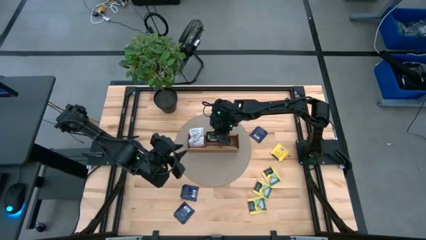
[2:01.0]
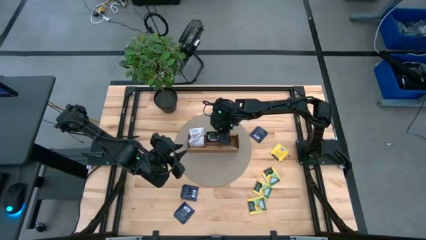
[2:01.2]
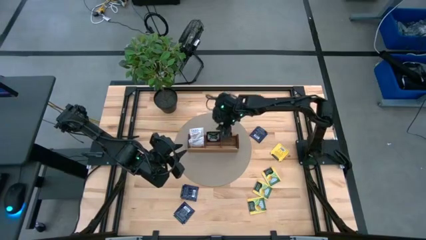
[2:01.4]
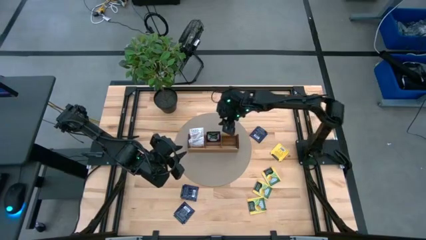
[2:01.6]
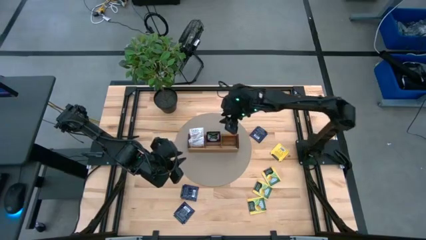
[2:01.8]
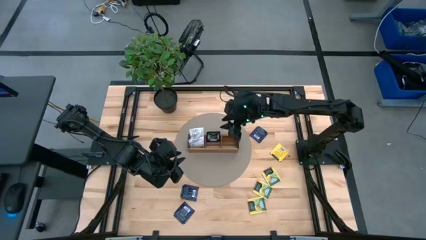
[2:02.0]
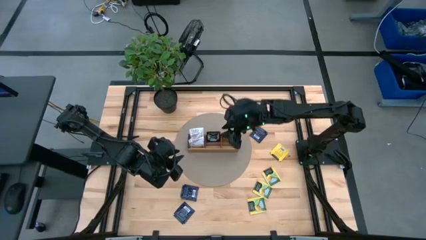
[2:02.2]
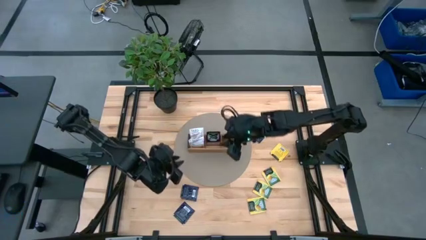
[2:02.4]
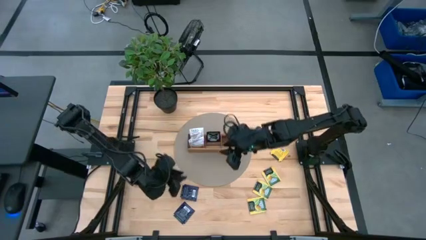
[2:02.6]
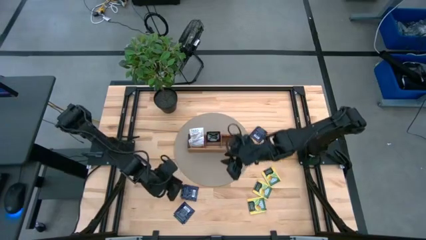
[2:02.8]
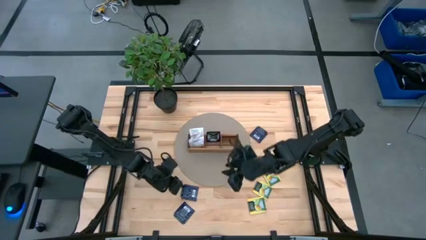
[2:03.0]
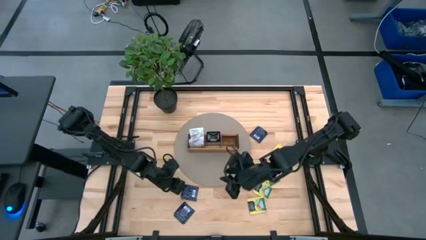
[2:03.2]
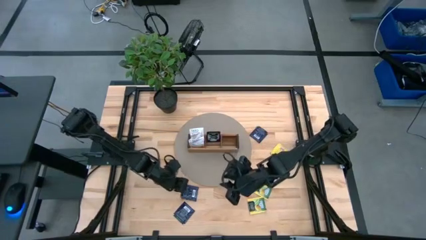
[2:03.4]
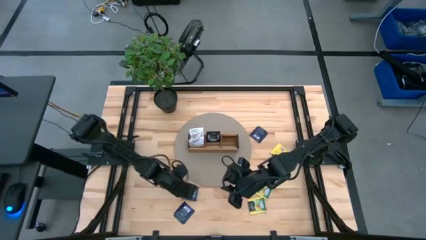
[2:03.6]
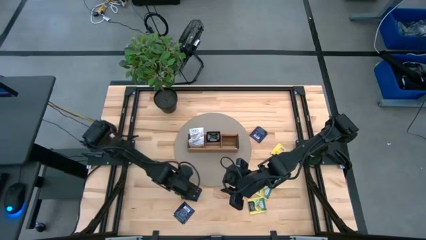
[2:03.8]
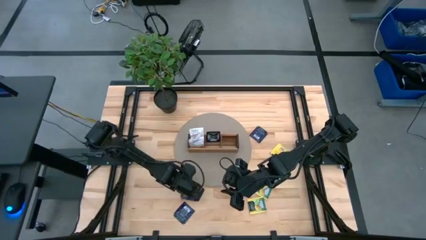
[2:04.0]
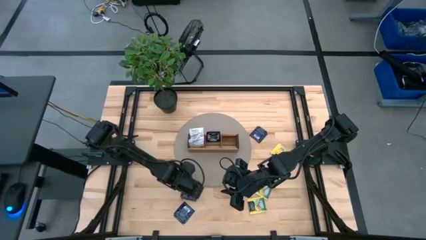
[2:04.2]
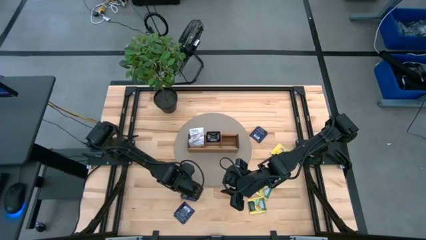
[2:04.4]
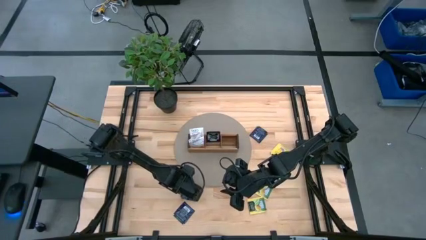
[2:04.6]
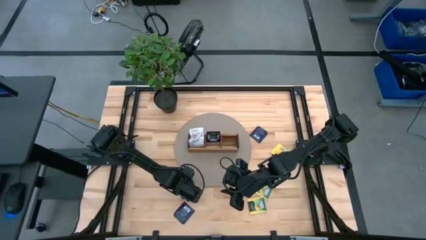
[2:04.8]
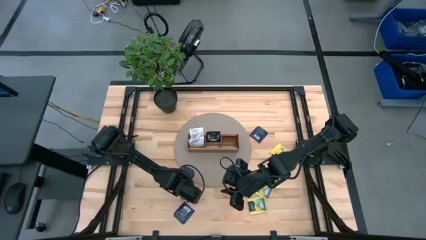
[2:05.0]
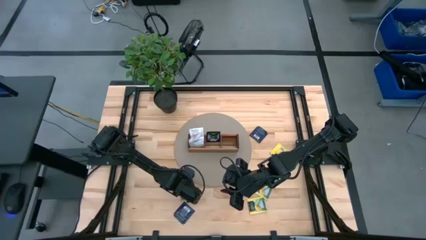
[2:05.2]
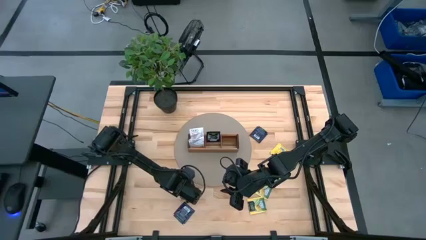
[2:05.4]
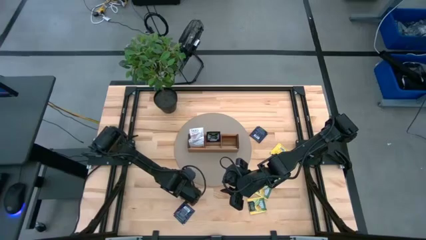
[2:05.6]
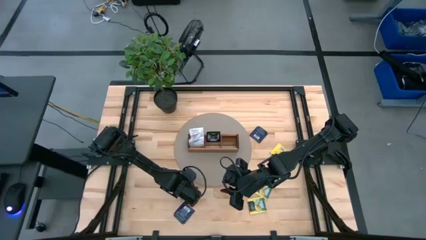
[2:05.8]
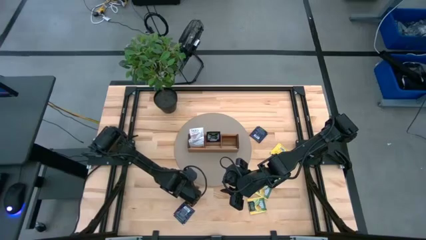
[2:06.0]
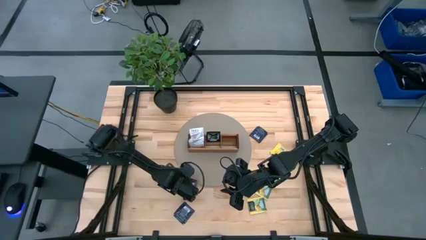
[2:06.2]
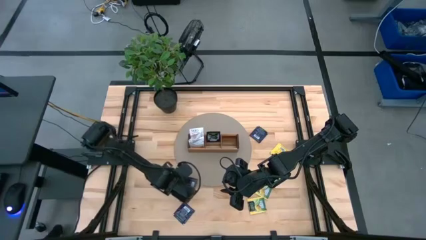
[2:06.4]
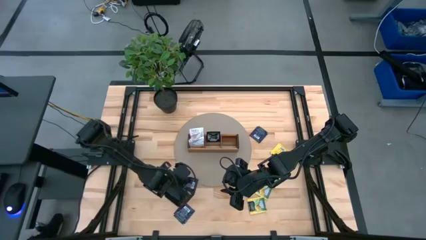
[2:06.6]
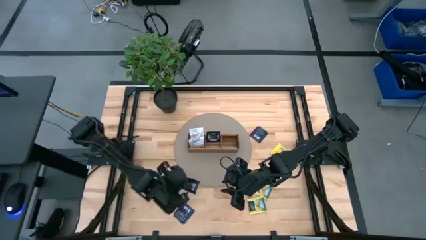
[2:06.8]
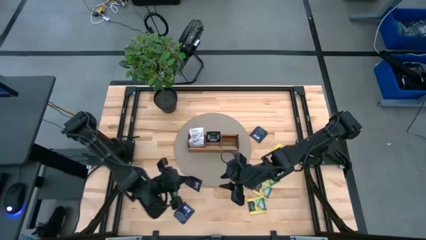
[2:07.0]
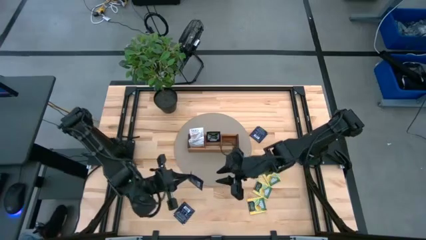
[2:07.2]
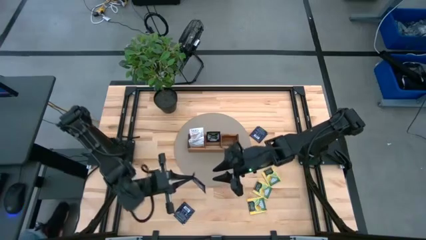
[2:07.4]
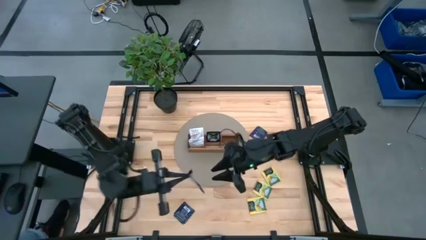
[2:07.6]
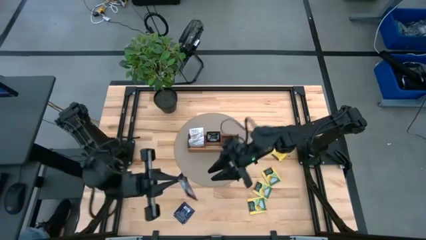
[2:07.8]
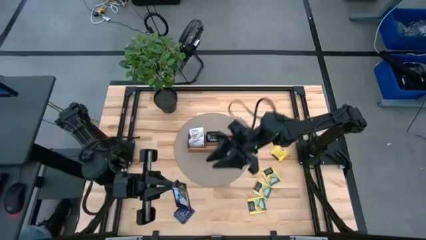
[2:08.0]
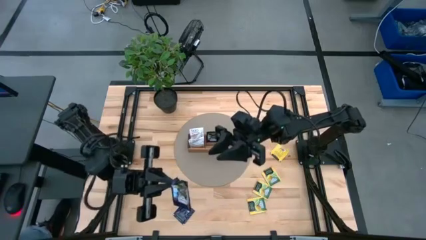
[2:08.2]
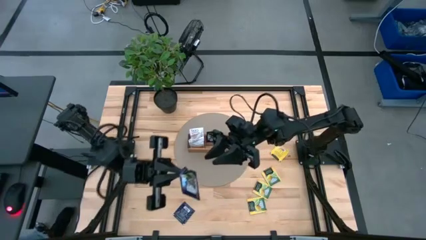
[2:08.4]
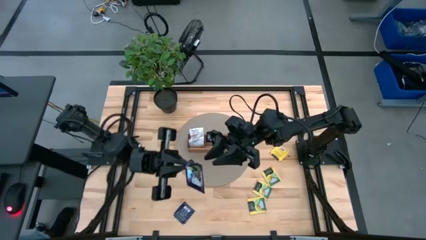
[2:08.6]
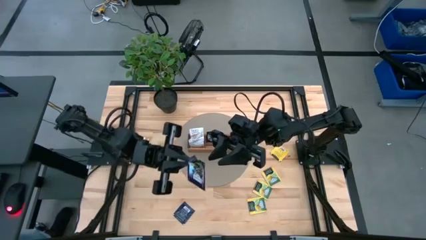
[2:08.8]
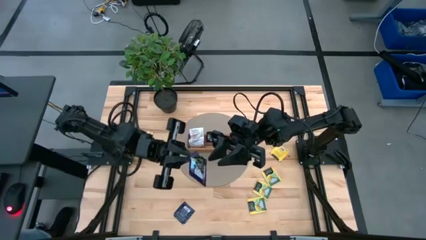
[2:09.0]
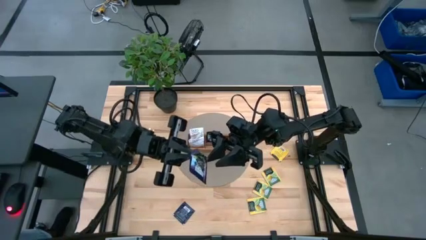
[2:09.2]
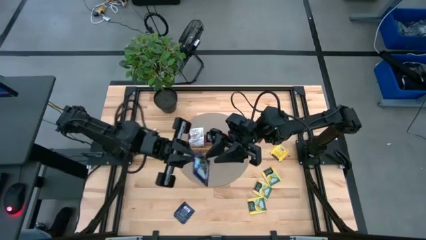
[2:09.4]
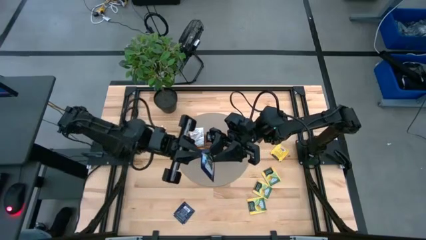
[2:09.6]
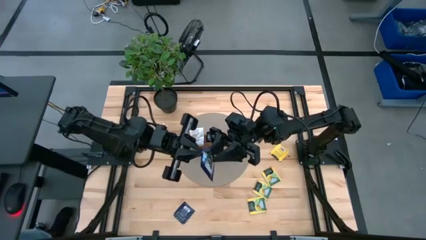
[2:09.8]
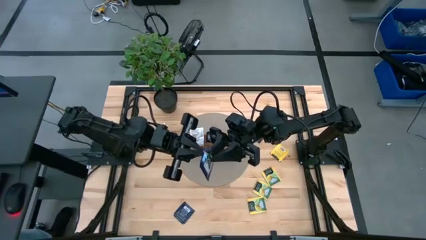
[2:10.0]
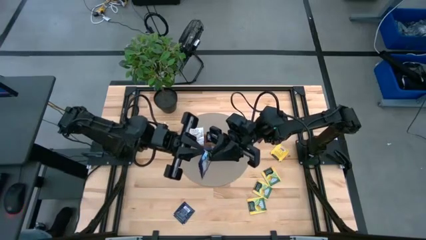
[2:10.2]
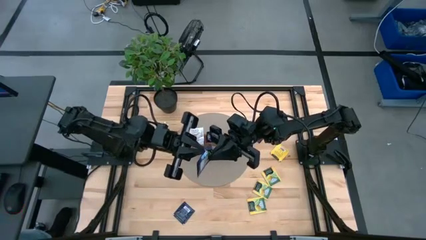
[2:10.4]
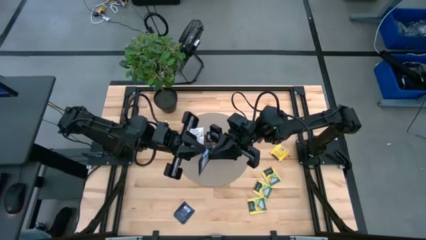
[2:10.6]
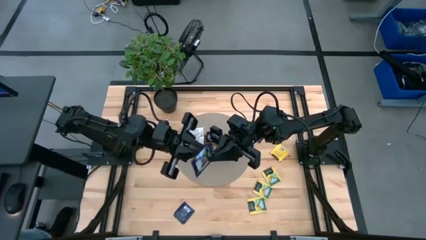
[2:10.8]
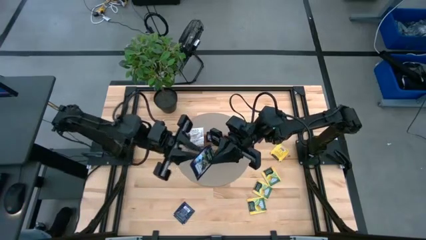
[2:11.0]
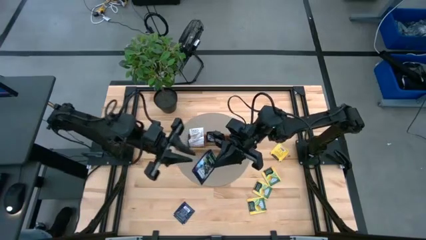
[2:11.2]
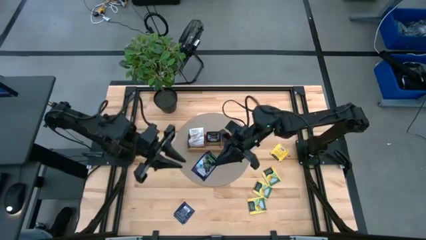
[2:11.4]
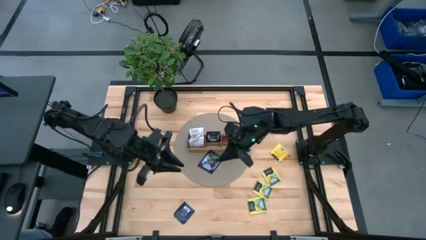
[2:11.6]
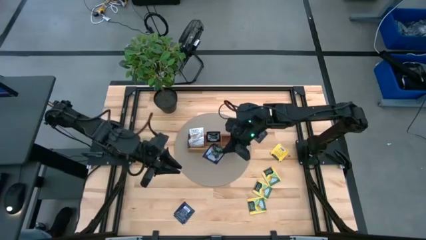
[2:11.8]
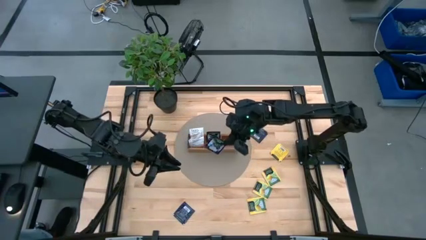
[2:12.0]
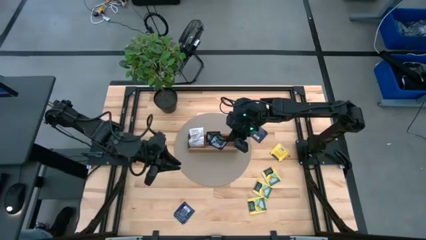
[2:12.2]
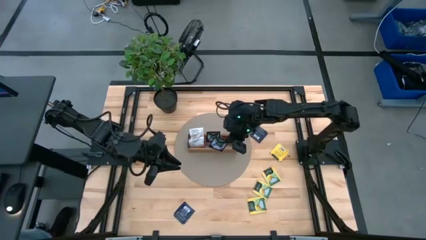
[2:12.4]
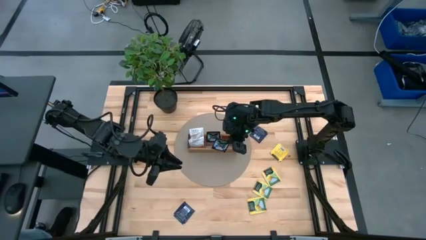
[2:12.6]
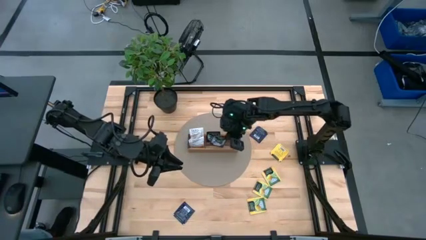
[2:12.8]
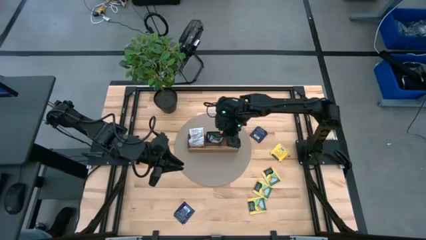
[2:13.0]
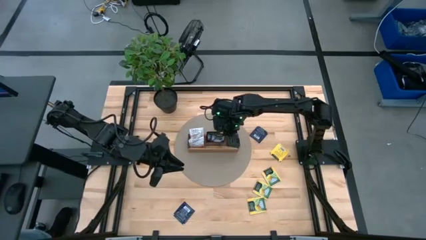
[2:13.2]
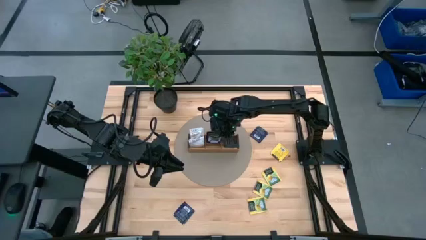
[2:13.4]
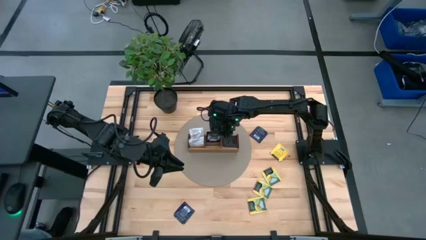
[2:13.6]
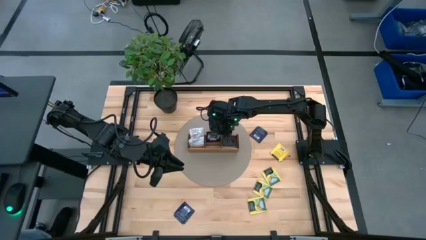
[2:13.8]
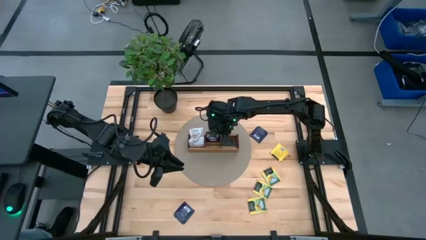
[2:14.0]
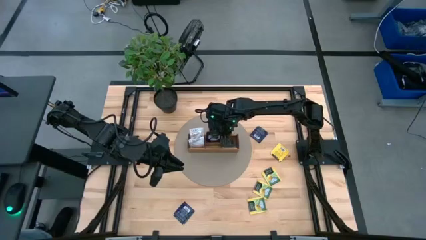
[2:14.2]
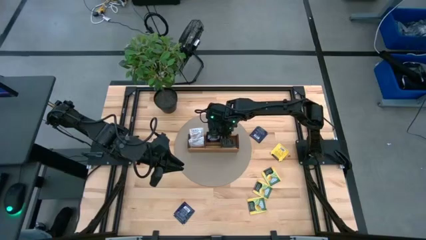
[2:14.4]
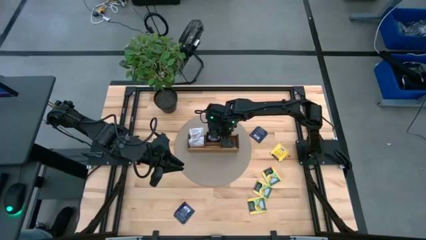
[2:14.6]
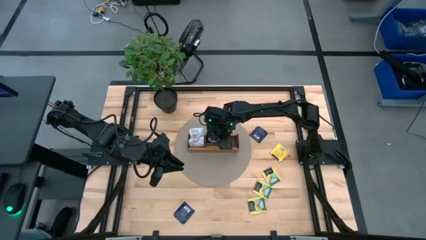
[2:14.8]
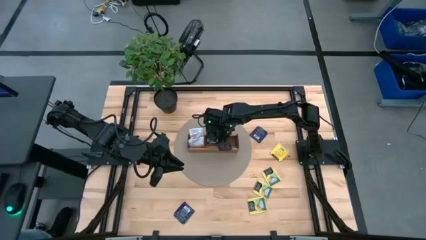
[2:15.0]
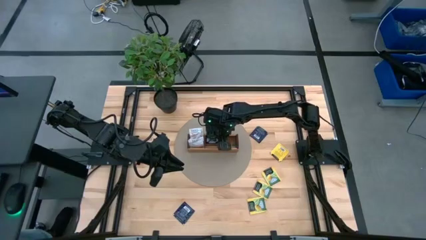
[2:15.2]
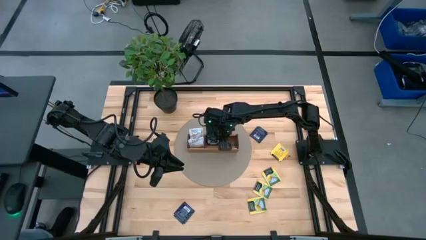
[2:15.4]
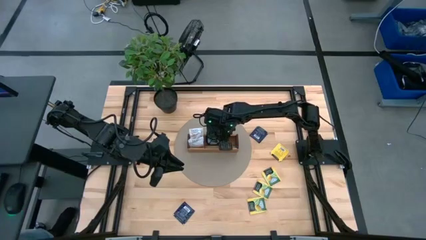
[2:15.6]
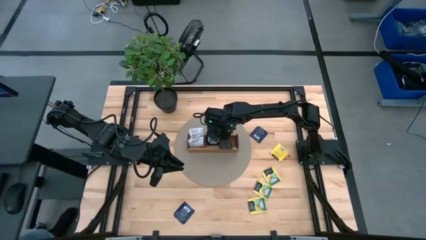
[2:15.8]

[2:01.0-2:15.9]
Task: Pick & Place Tea
Put the blue tea bag into the middle section of the wooden organizer

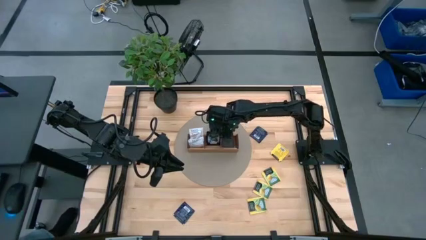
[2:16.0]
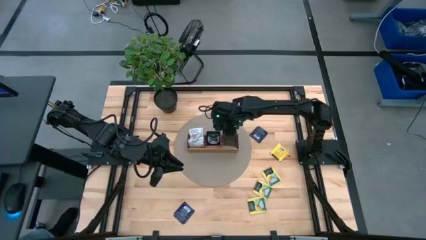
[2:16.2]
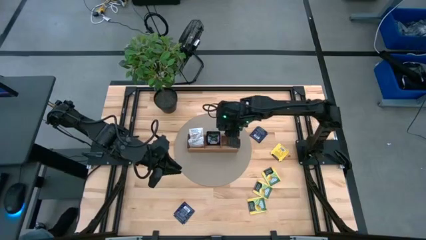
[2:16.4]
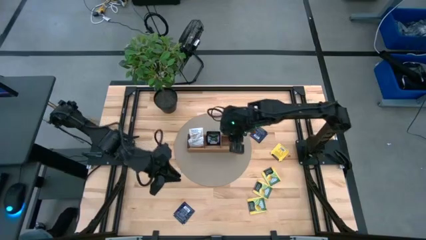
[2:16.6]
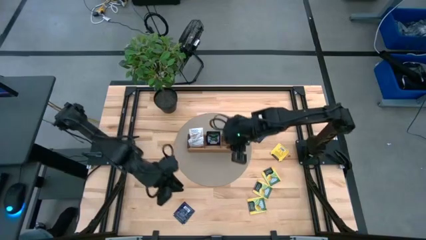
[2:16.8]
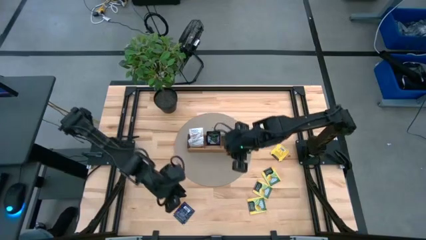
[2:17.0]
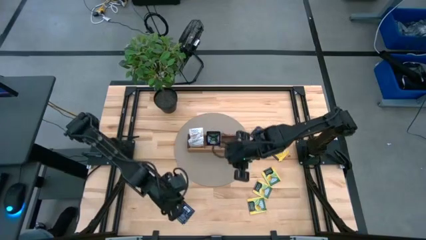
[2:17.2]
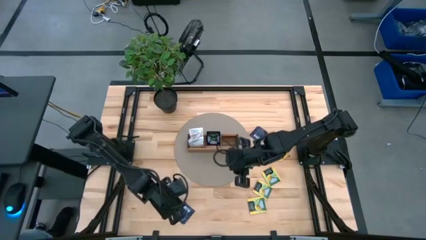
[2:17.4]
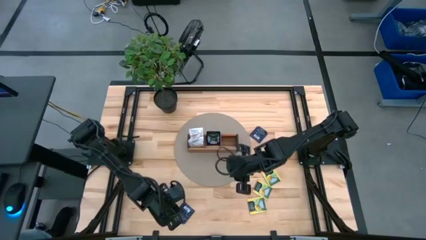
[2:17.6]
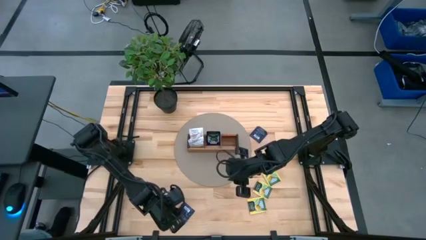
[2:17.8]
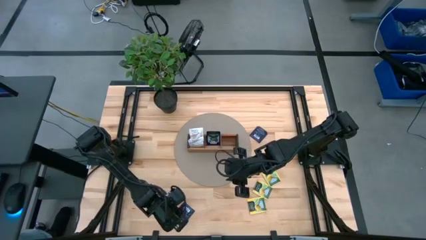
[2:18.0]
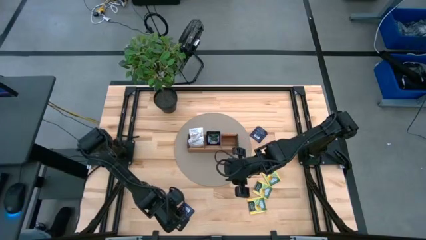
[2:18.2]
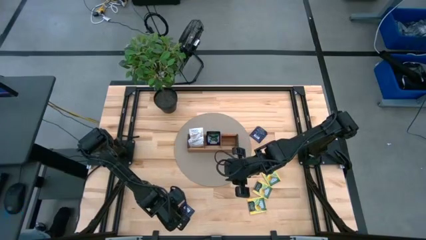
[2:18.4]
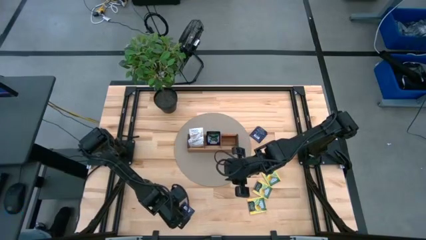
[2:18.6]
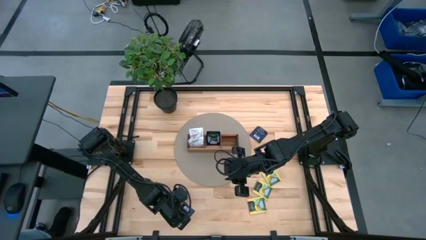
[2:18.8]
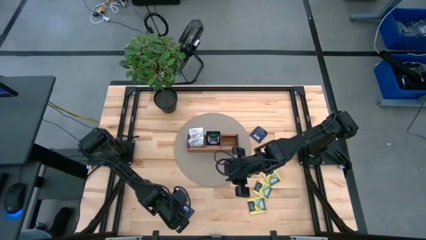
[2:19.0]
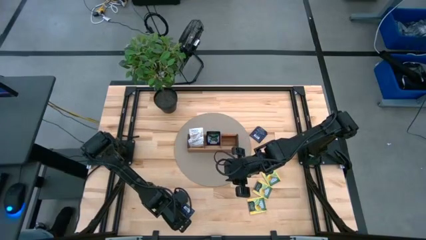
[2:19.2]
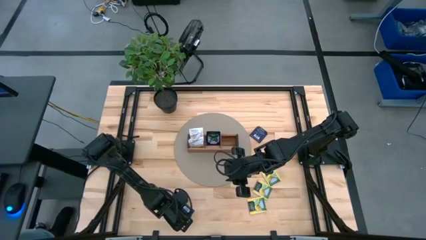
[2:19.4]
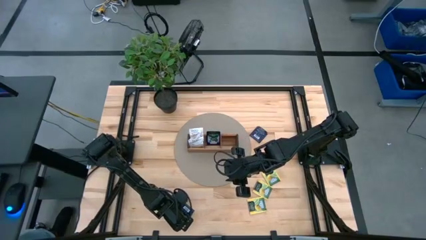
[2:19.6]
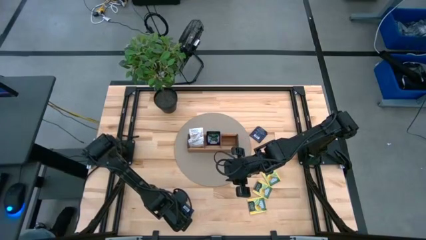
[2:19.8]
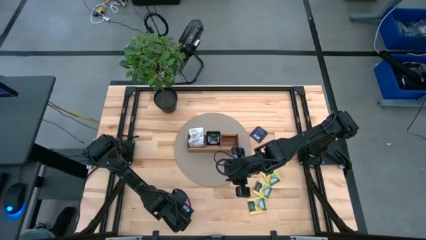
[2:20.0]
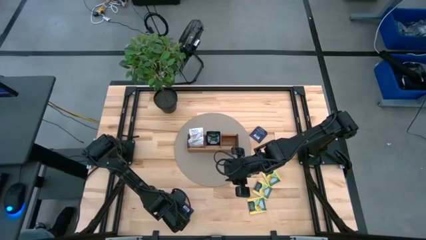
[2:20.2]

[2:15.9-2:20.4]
Put the blue tea bag into the middle section of the wooden organizer
